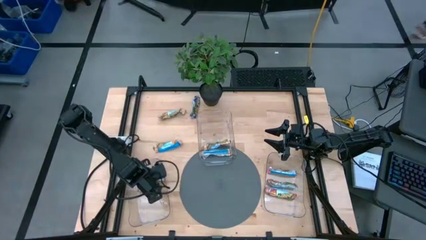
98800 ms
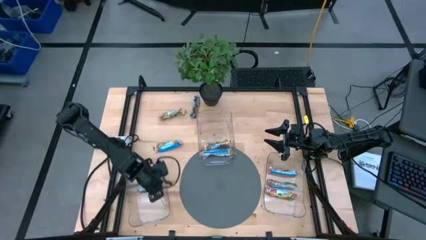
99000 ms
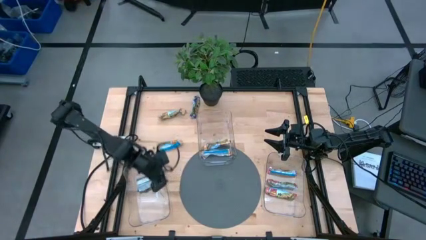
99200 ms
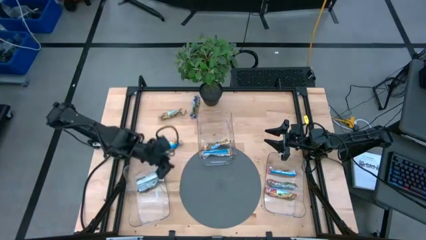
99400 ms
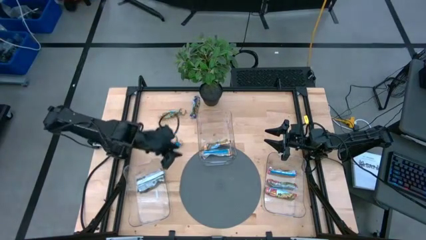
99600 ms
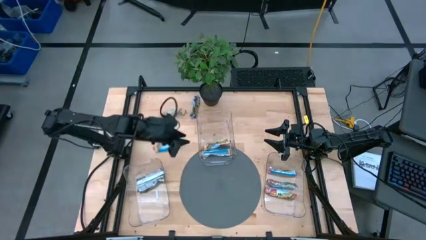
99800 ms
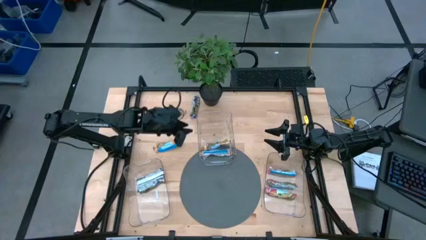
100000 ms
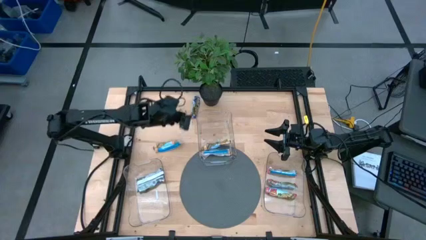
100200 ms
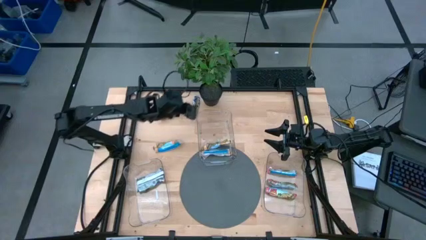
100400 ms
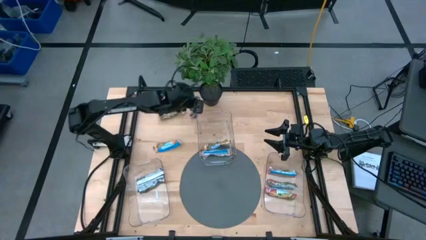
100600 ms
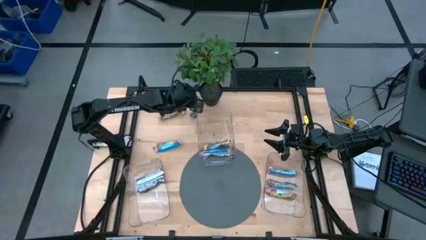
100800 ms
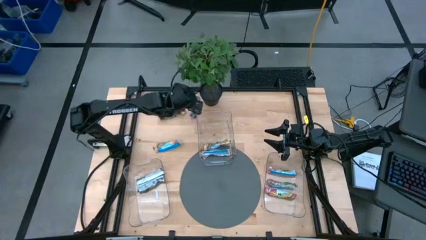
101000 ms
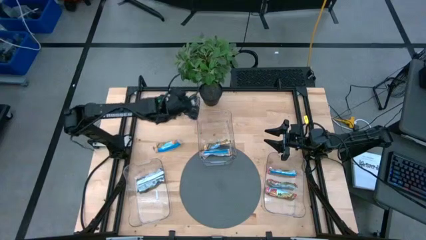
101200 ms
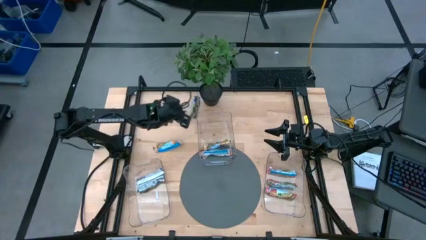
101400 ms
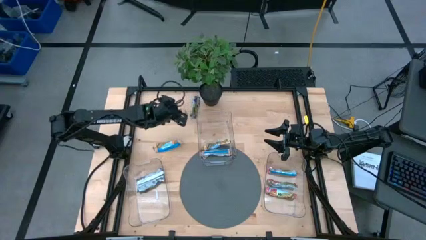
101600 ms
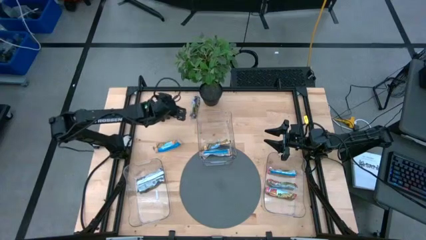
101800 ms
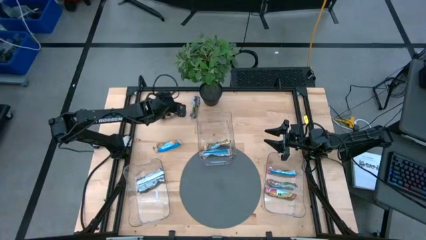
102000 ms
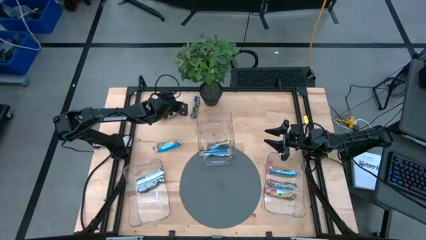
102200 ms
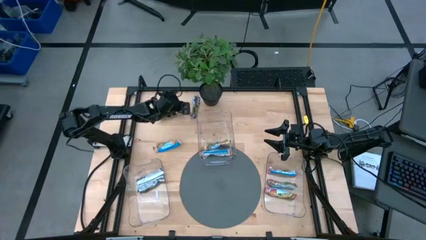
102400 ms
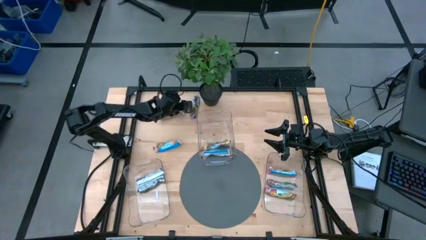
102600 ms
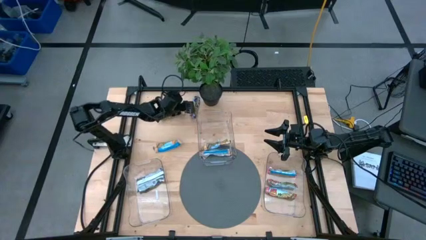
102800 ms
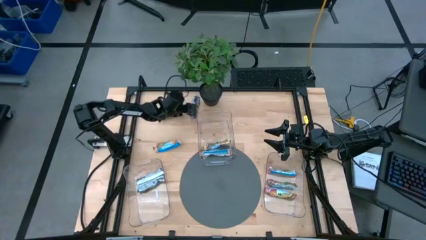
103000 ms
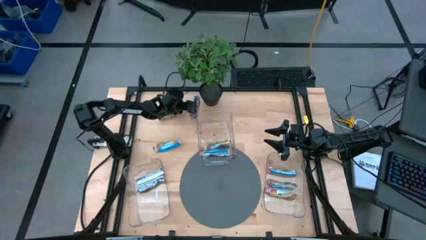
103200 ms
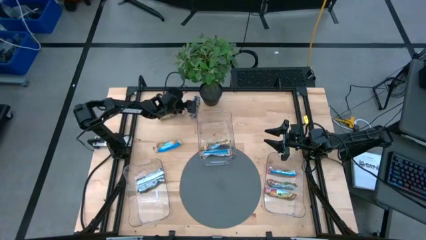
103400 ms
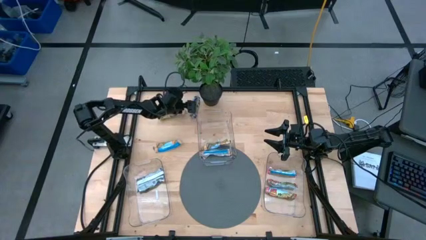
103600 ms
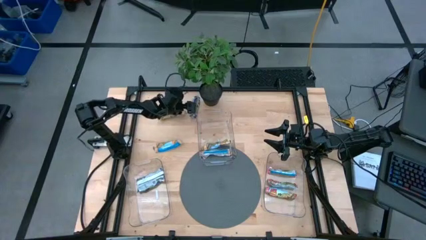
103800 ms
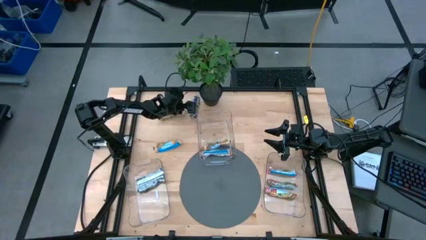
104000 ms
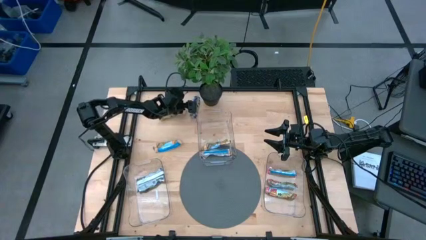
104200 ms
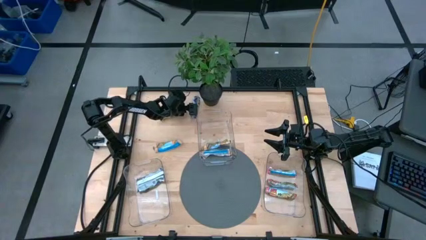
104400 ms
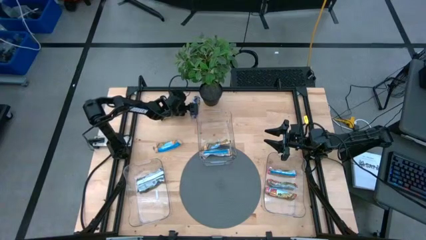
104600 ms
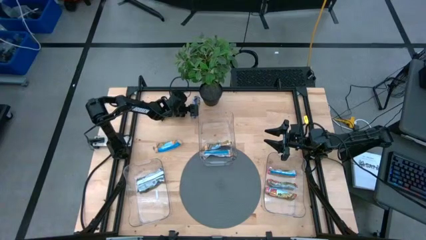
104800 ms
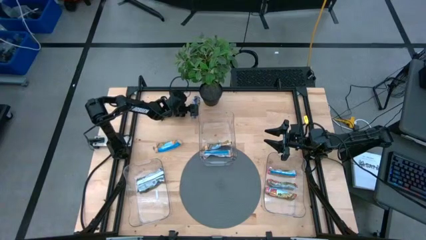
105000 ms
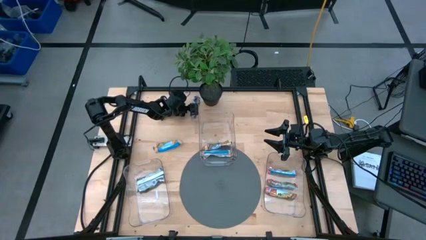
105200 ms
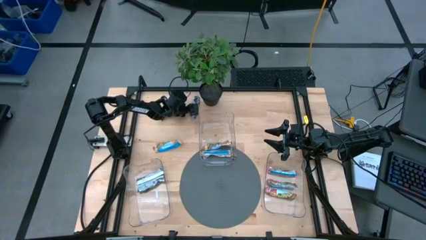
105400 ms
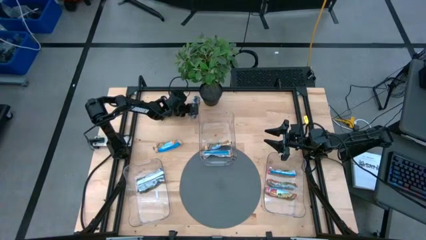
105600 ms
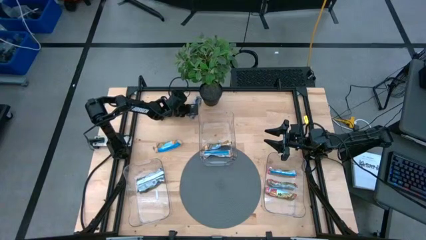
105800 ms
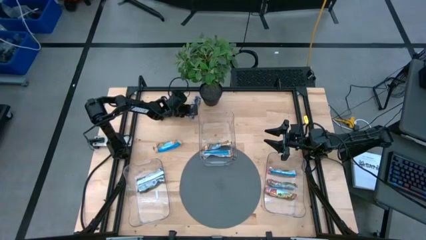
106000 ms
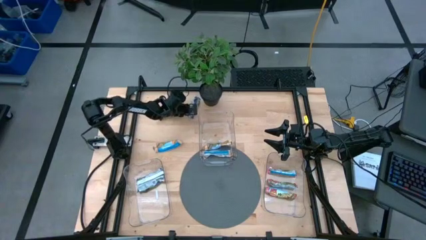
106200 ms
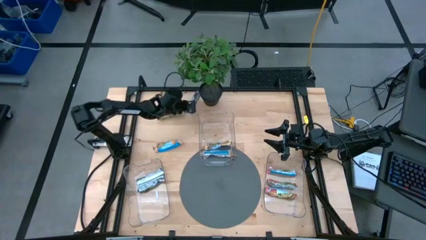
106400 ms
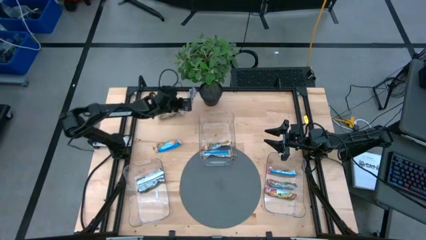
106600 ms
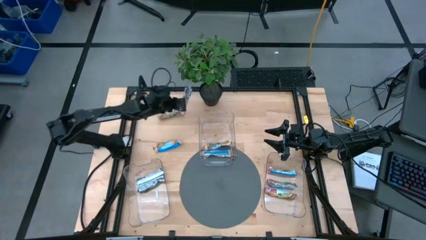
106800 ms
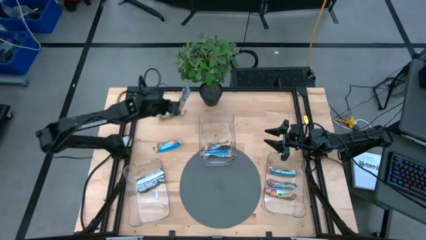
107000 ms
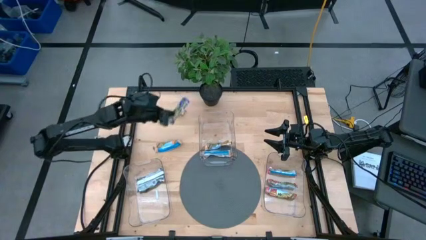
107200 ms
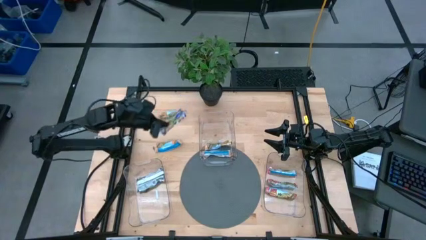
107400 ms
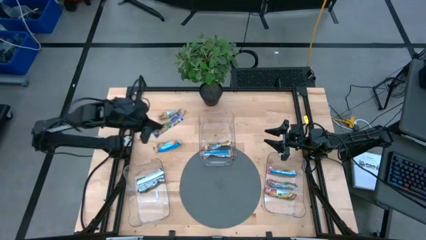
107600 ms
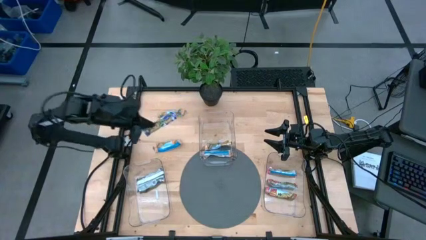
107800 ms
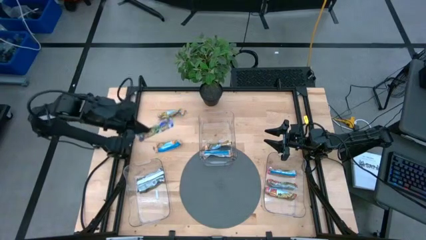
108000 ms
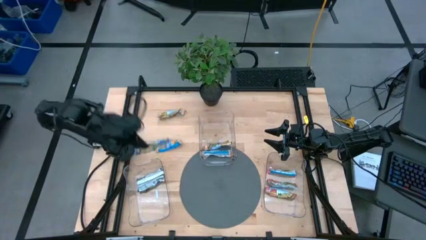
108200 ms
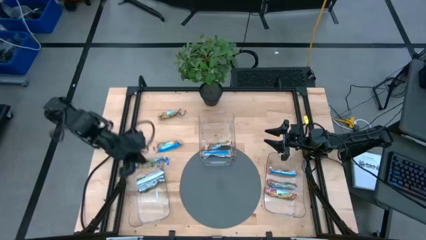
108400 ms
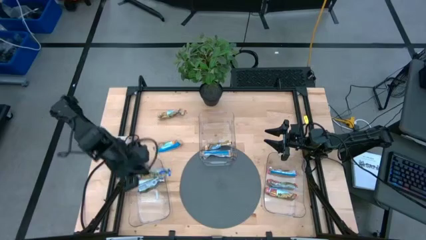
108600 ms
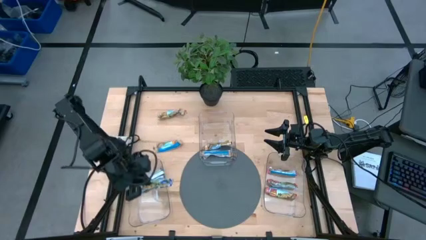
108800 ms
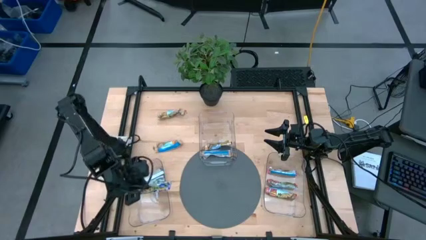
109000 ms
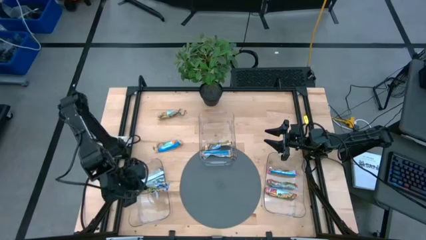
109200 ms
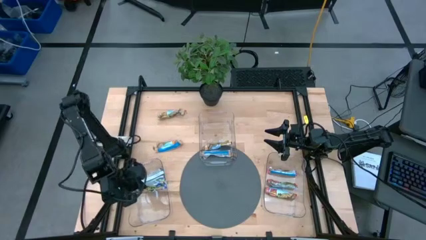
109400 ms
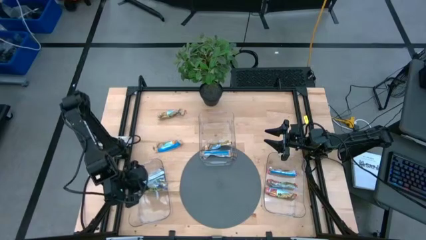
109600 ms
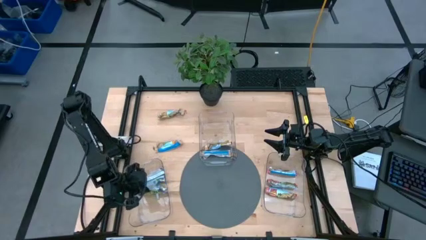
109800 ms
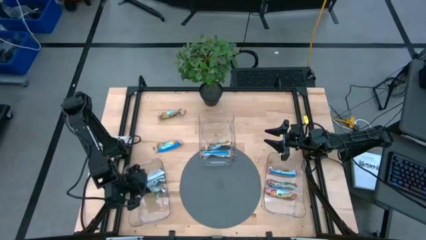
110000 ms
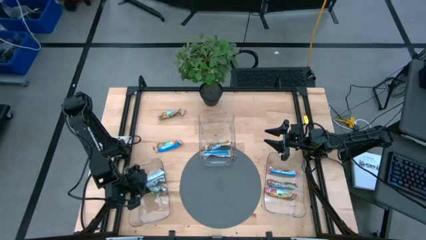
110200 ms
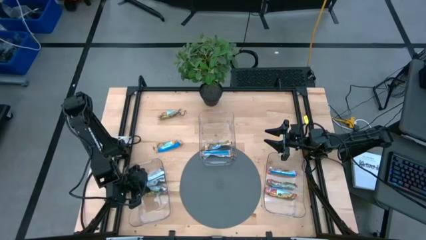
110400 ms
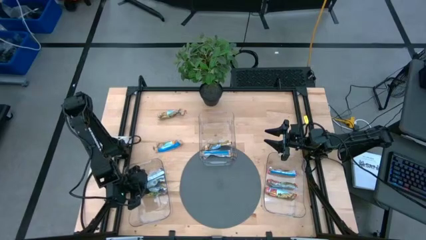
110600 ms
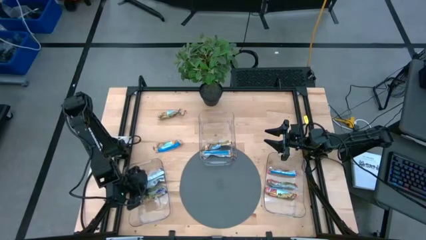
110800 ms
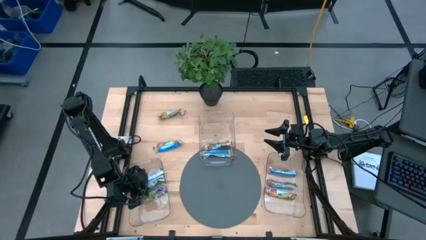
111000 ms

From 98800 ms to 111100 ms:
Task: Pick and place Granola Bars by type
Put the green granola bar into the left transparent bin
